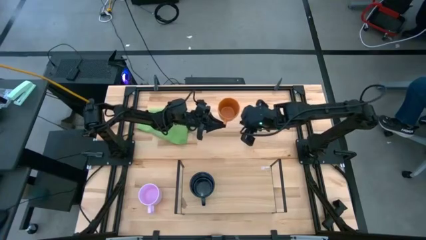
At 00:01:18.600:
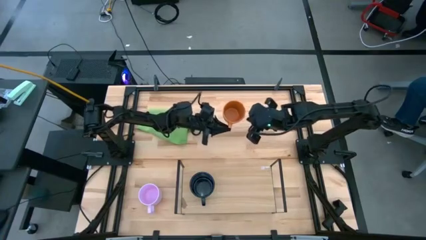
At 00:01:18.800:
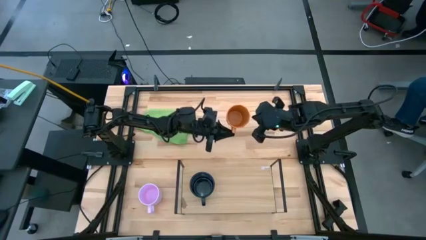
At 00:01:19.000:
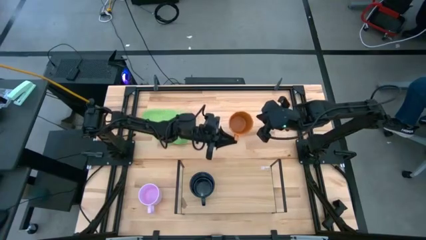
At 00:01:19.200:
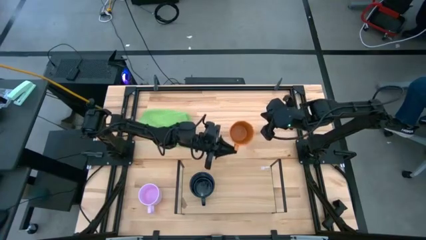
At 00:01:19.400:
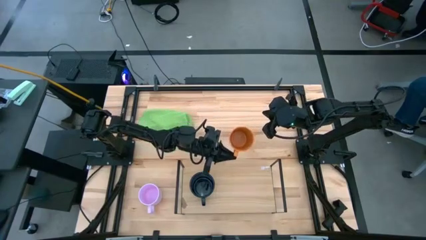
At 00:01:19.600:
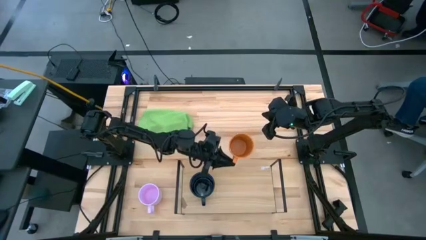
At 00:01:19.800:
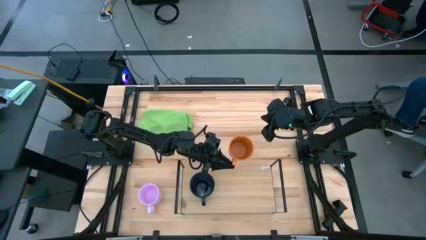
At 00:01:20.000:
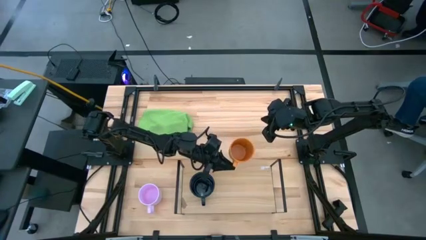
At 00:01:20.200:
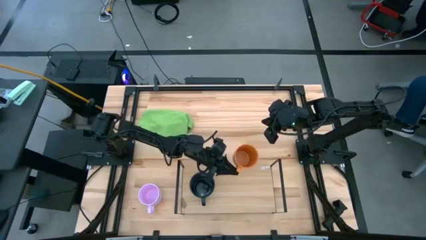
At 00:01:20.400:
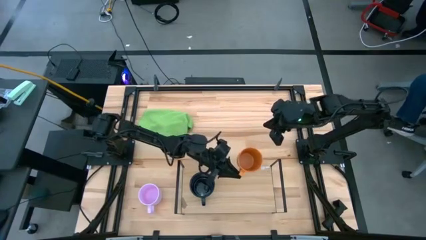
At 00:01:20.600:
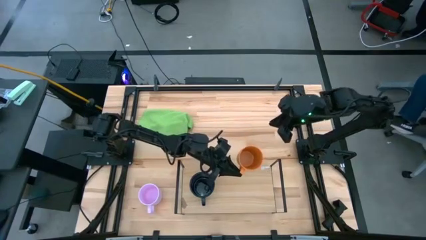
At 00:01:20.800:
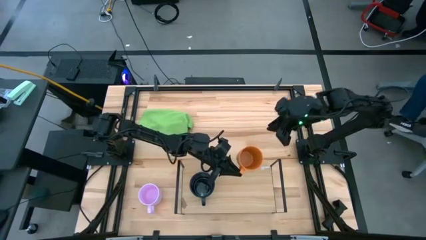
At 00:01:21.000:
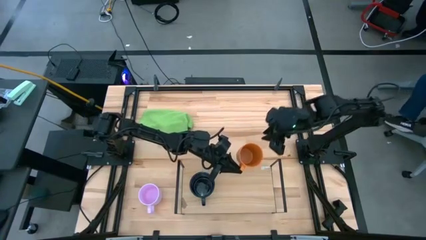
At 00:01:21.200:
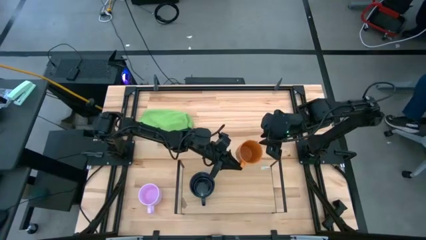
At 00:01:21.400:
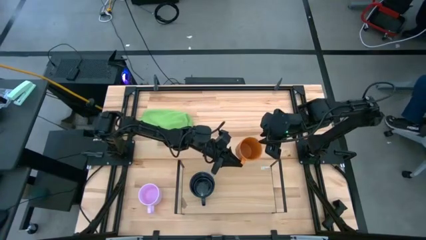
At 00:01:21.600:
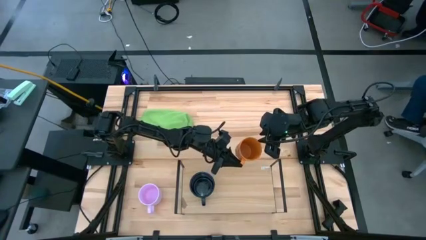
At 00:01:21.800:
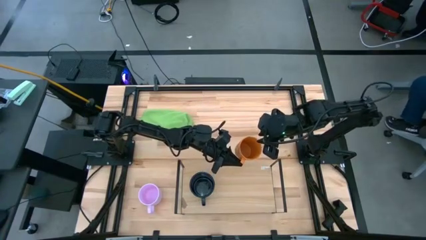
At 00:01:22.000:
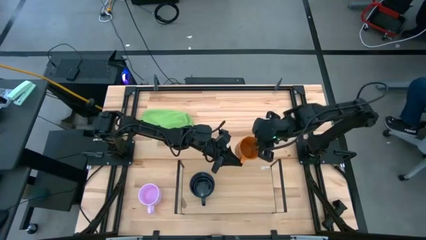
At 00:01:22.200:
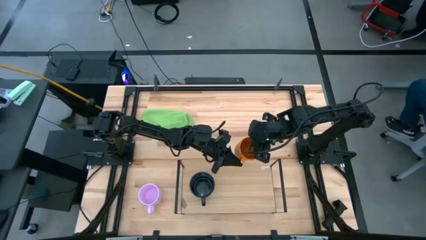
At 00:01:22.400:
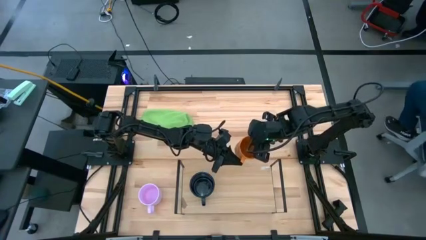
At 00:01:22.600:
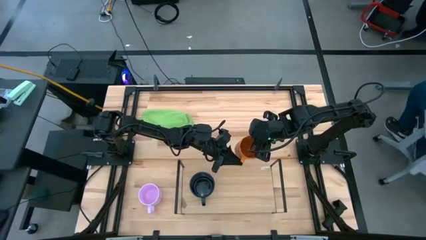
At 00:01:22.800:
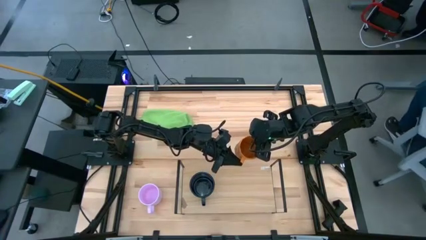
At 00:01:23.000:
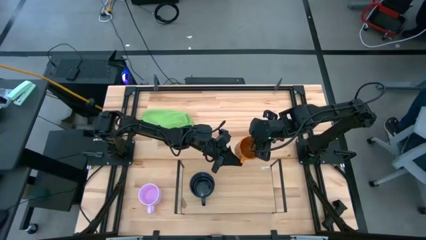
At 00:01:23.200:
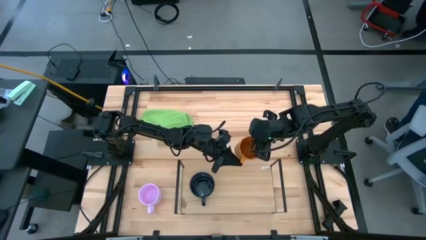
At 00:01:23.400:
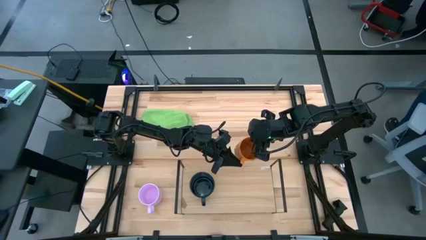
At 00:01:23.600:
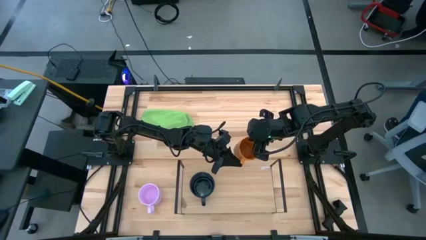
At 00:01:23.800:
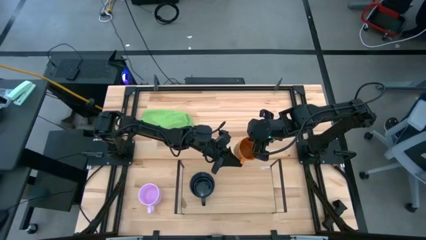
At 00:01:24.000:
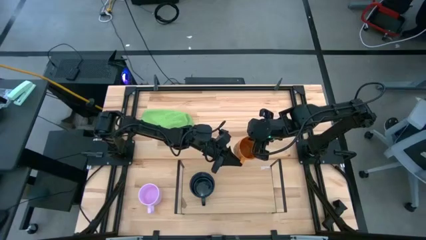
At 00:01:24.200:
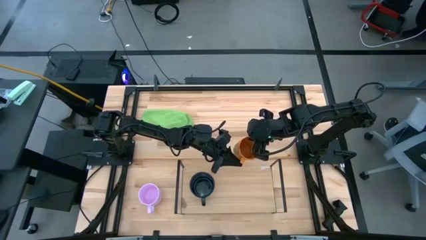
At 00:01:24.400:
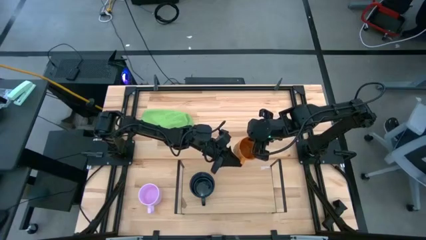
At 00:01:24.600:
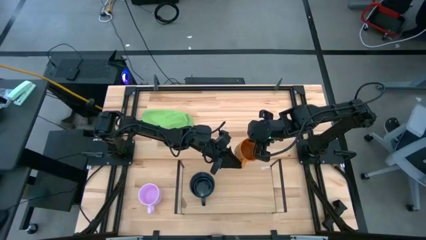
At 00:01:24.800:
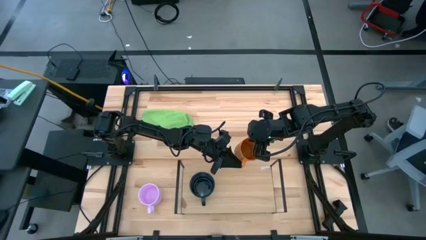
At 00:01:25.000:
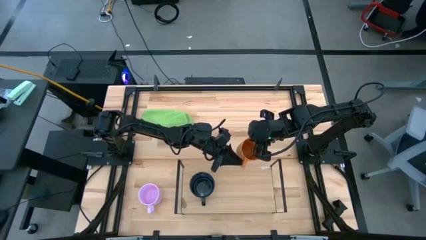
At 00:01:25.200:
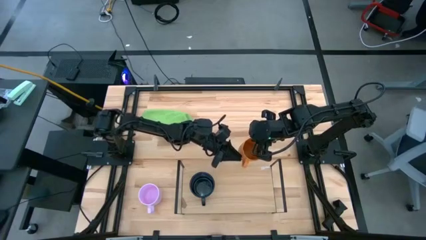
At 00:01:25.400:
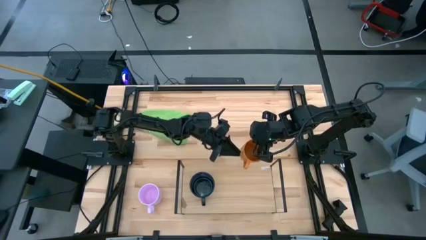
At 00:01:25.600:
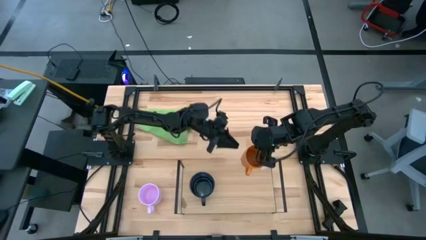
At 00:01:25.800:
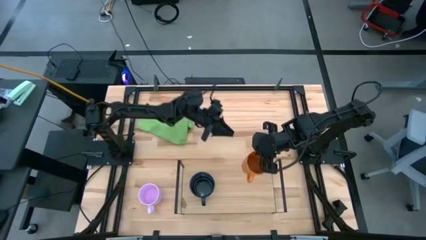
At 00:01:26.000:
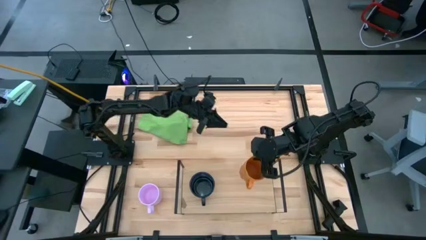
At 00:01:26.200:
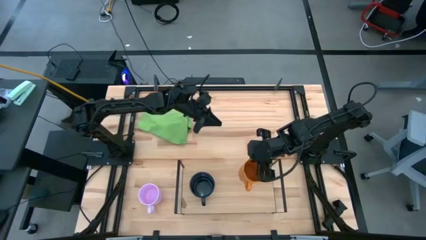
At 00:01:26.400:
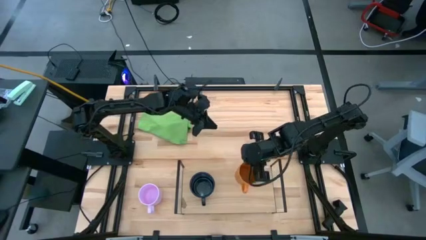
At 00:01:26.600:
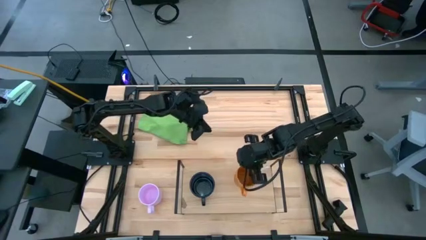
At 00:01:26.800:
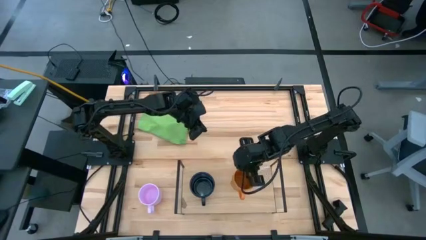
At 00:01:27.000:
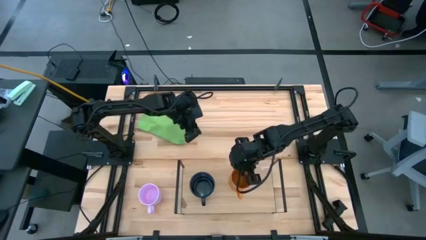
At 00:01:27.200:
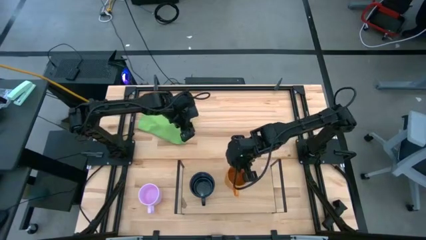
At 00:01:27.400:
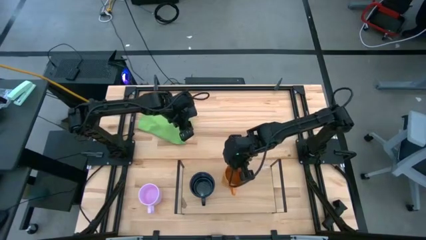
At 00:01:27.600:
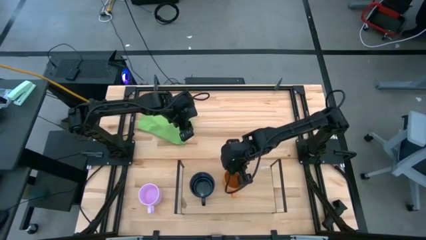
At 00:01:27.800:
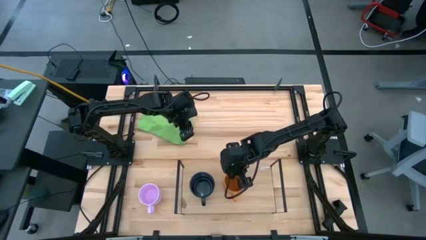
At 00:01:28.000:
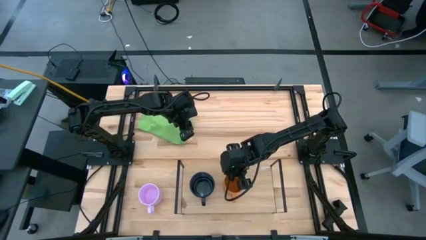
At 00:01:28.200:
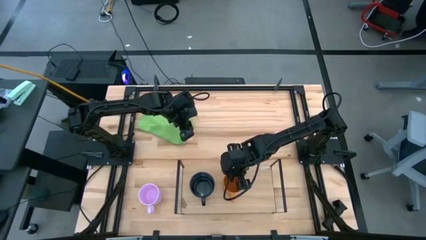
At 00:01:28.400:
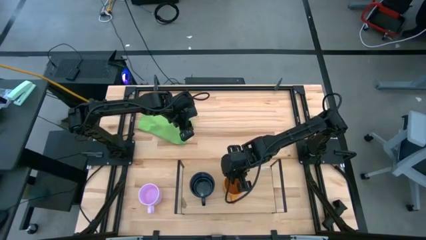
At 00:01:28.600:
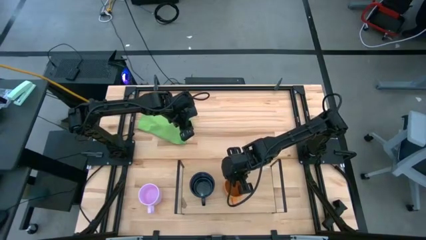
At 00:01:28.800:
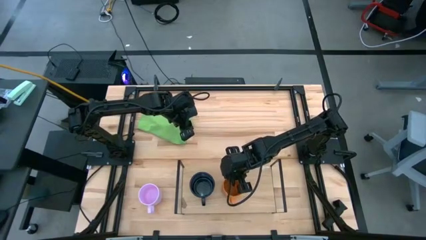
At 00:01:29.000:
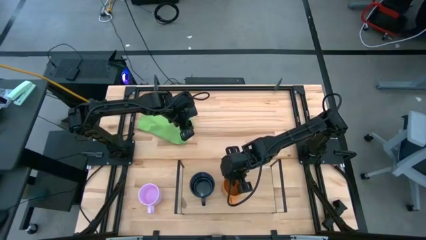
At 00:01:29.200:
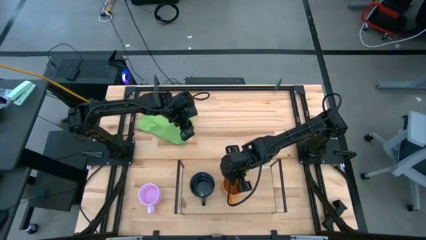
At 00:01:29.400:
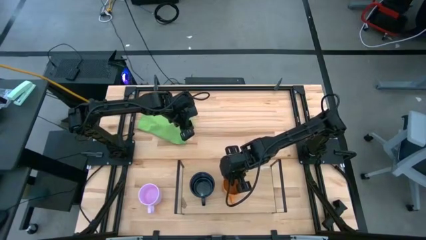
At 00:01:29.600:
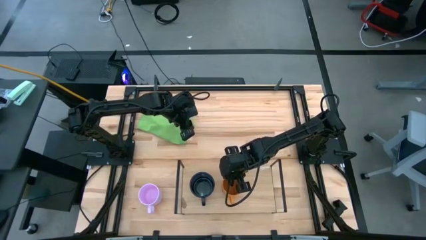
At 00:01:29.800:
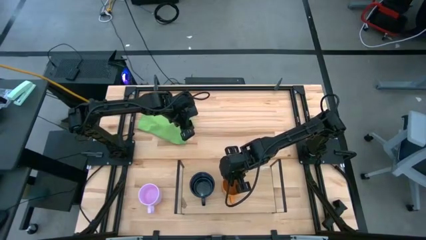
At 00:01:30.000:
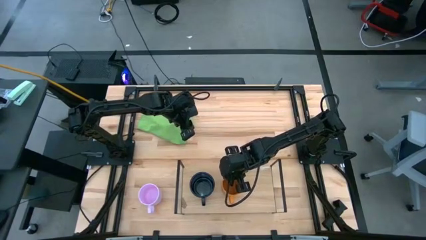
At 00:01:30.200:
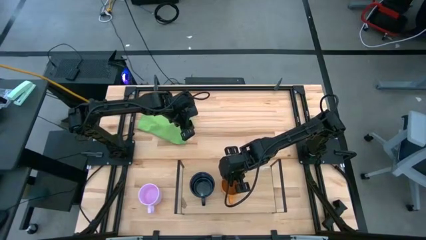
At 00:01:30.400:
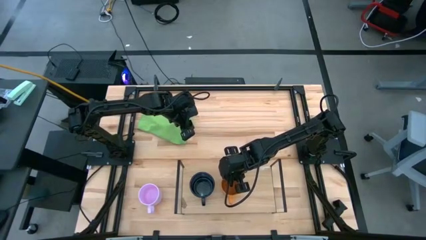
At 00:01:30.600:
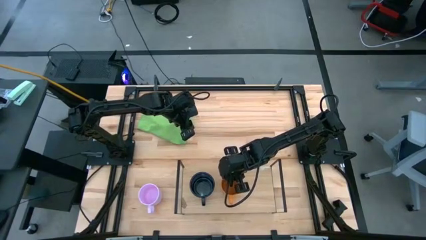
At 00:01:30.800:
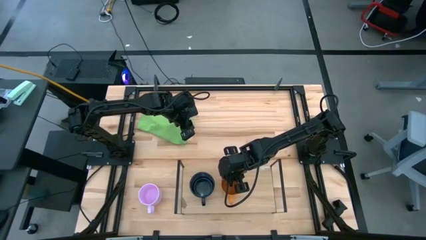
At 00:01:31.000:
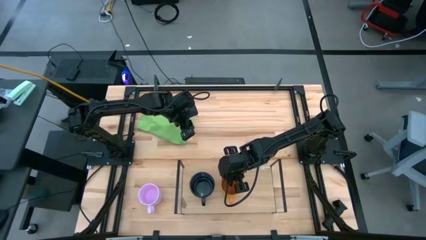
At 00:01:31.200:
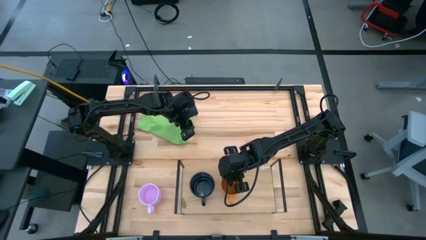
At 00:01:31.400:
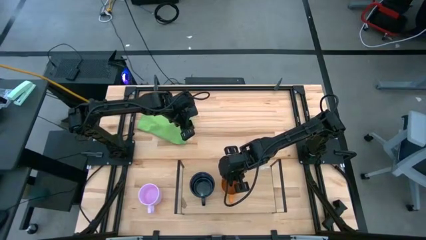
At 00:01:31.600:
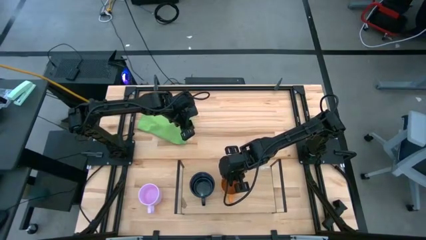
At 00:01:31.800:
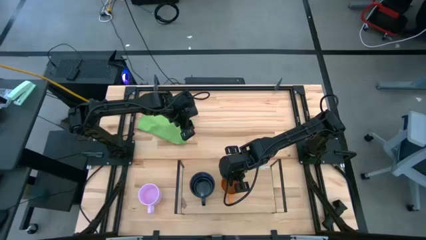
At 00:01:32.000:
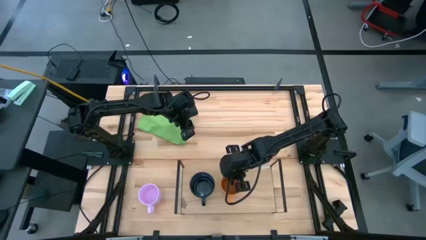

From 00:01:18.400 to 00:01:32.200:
Task: Stack small to large cups/mugs on shelf
Put the orange mug on the shelf
